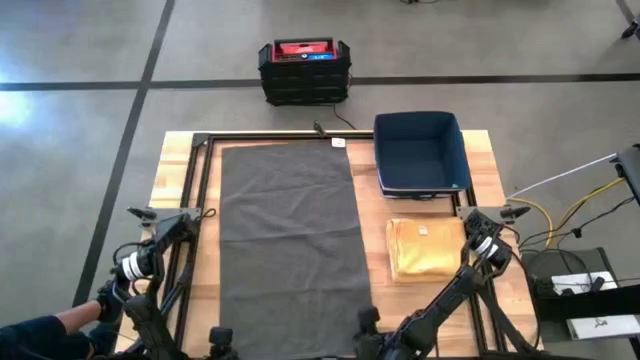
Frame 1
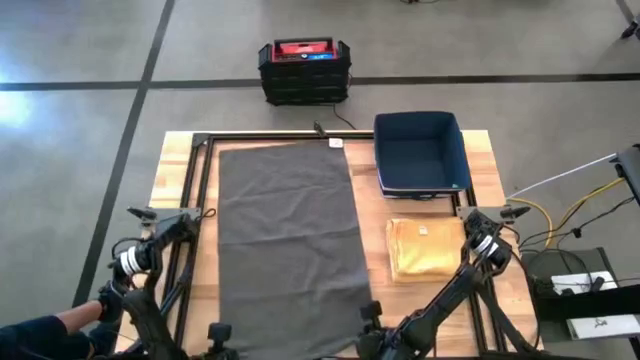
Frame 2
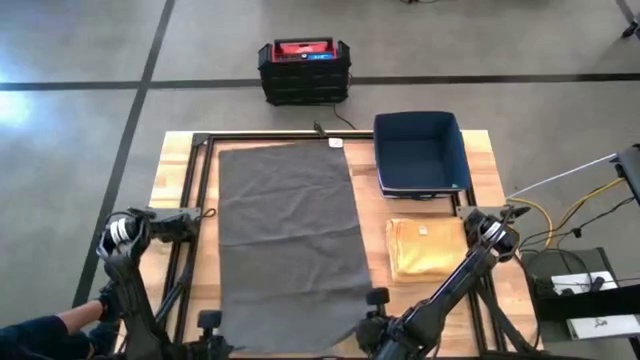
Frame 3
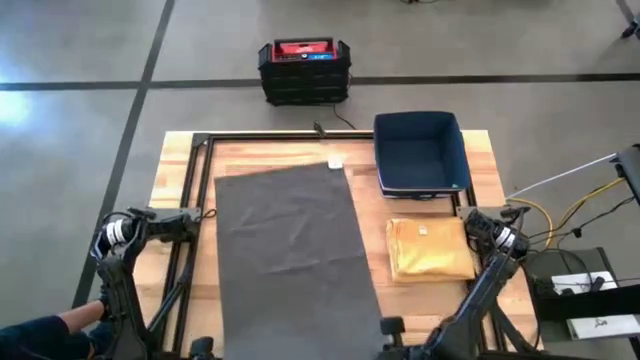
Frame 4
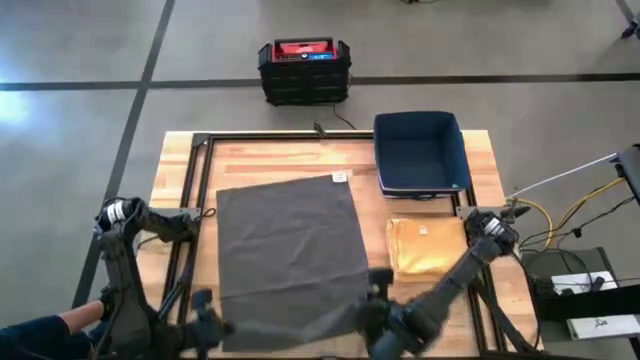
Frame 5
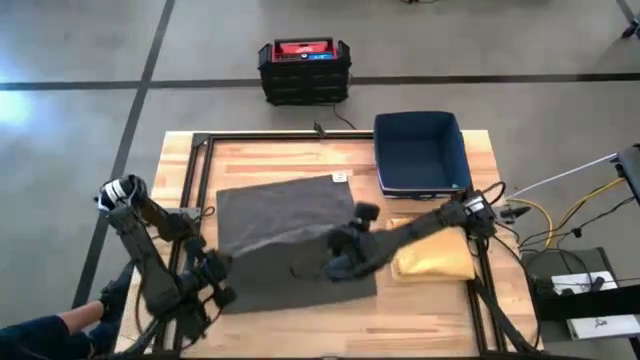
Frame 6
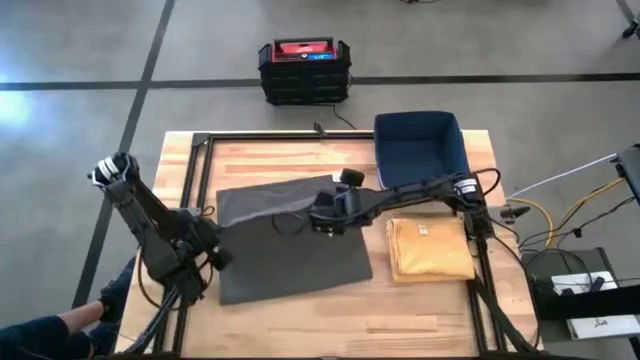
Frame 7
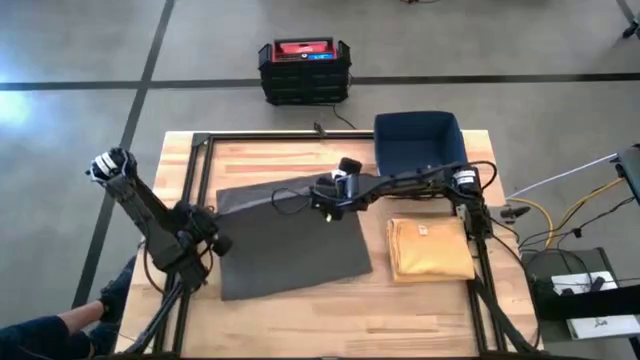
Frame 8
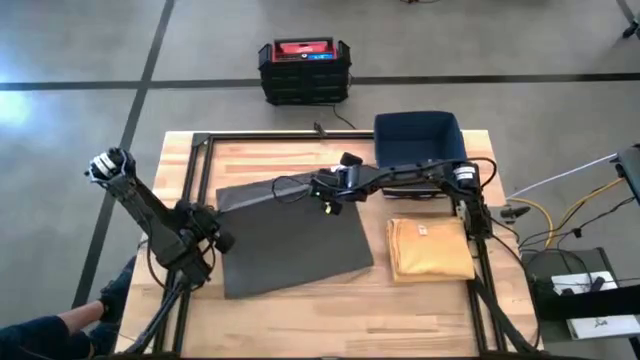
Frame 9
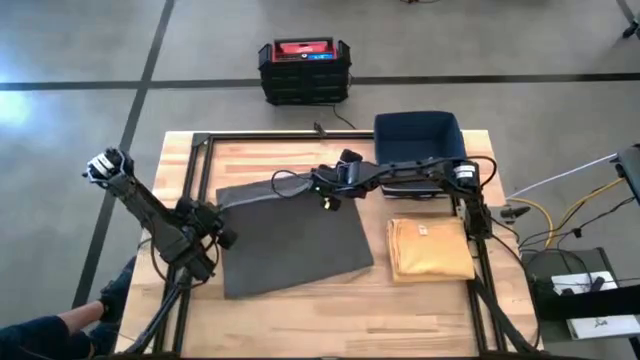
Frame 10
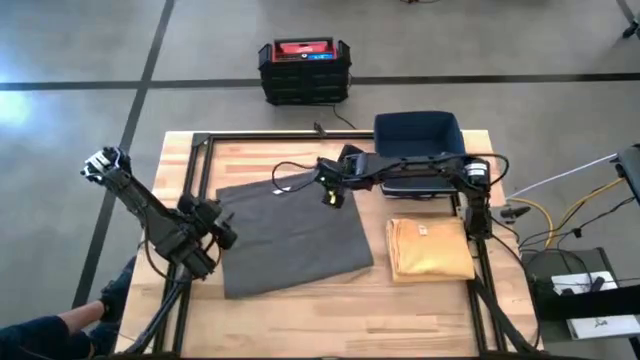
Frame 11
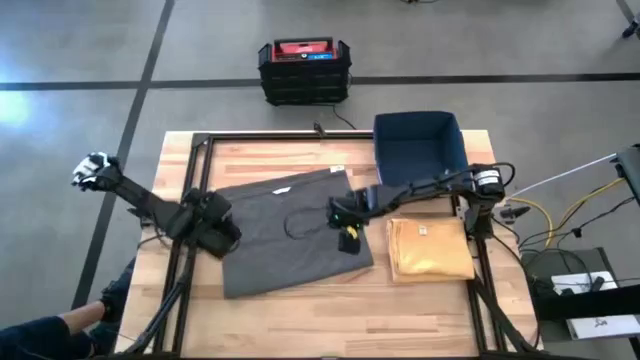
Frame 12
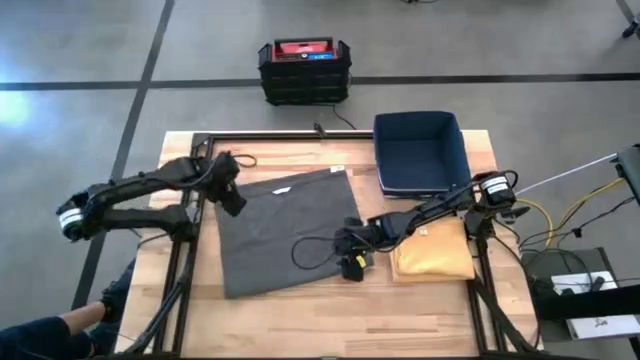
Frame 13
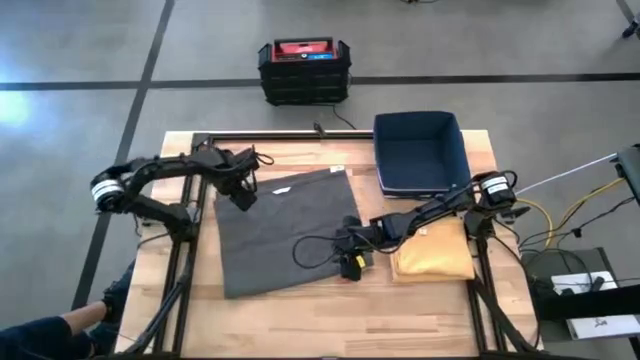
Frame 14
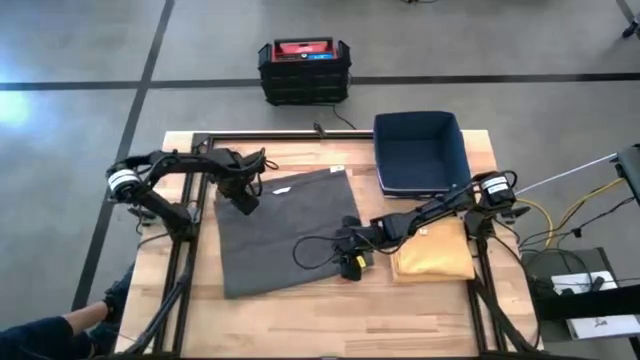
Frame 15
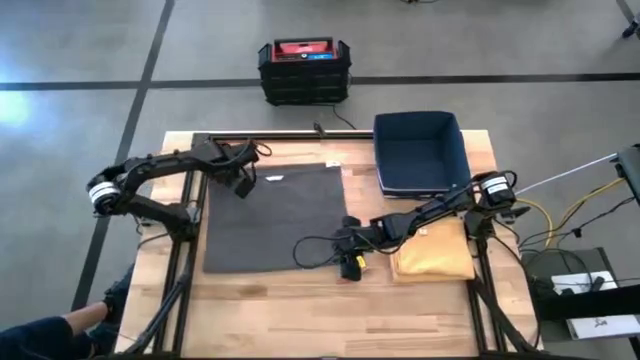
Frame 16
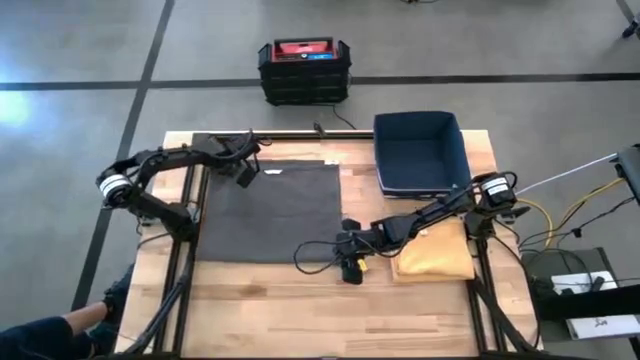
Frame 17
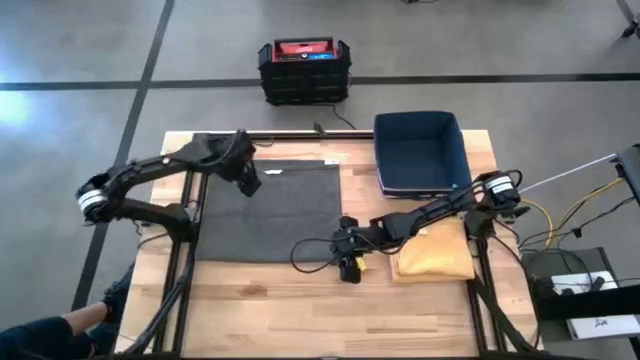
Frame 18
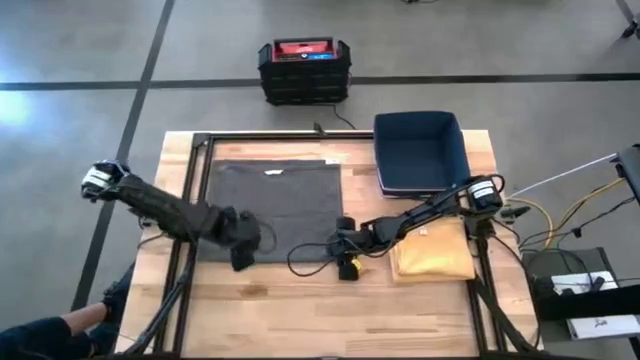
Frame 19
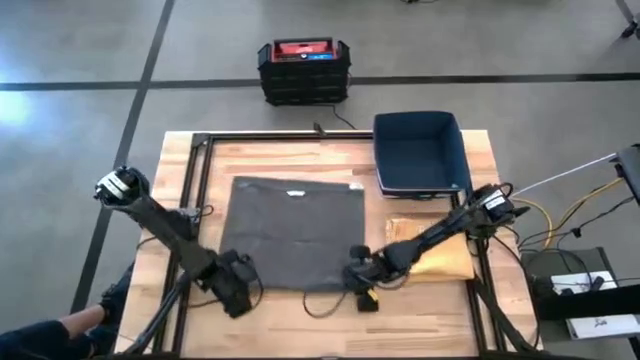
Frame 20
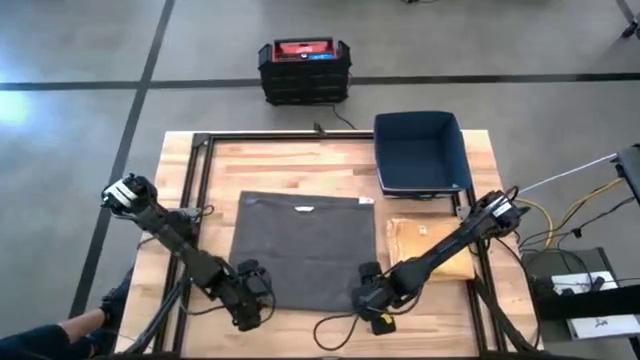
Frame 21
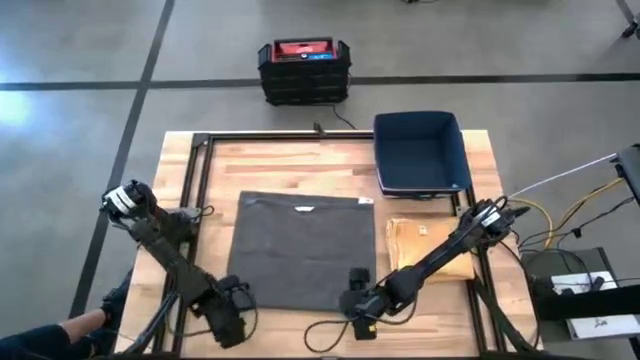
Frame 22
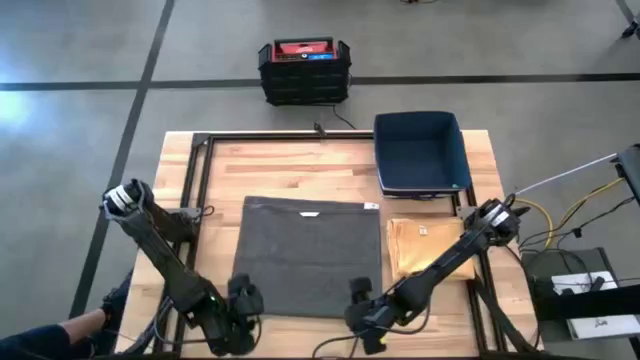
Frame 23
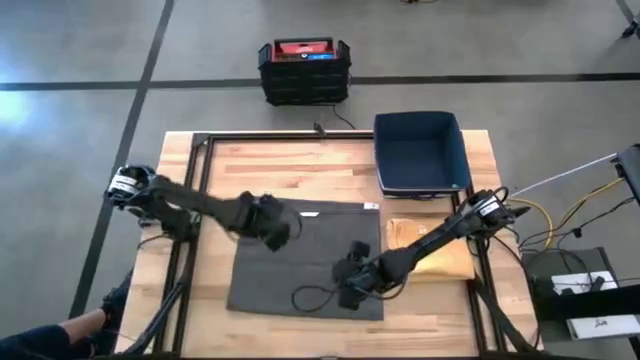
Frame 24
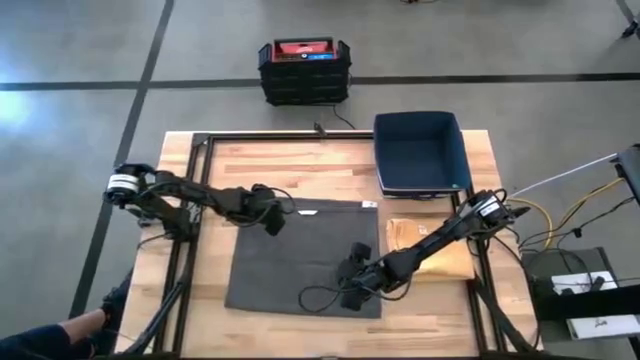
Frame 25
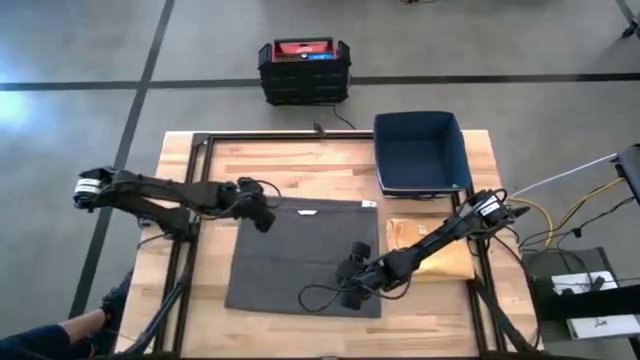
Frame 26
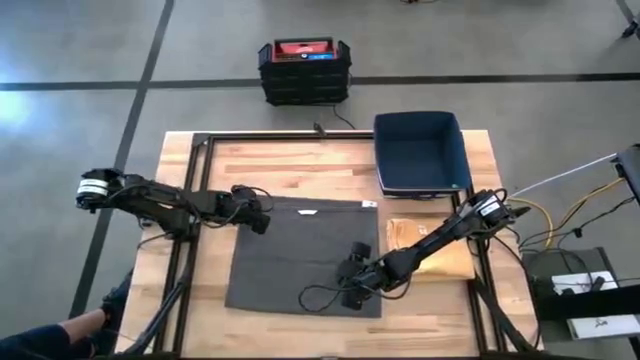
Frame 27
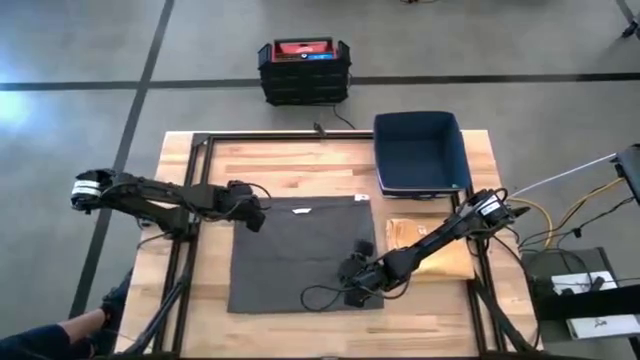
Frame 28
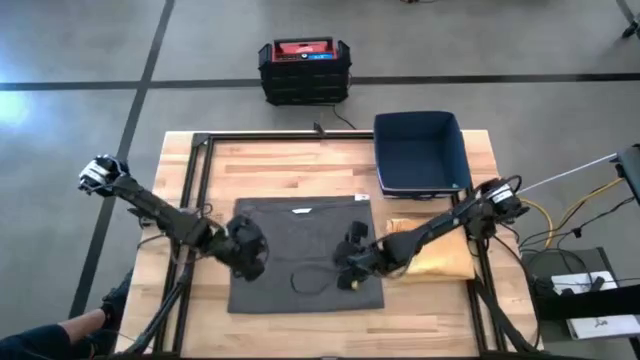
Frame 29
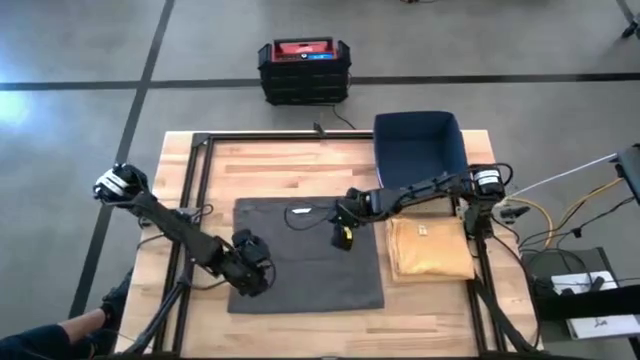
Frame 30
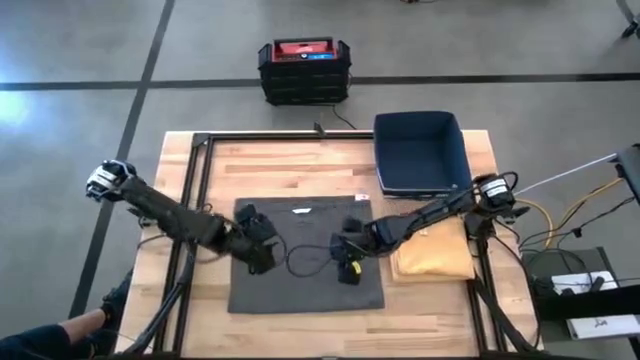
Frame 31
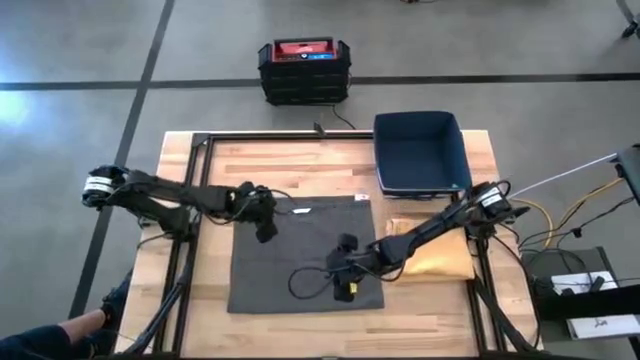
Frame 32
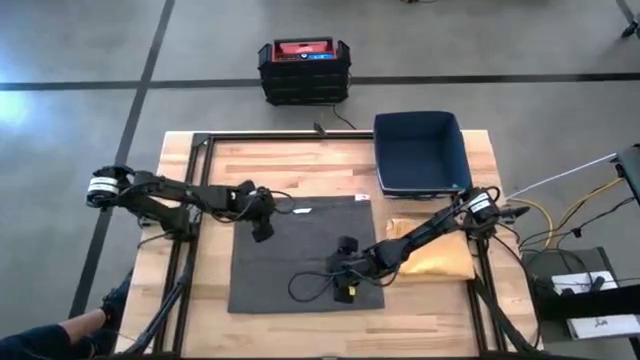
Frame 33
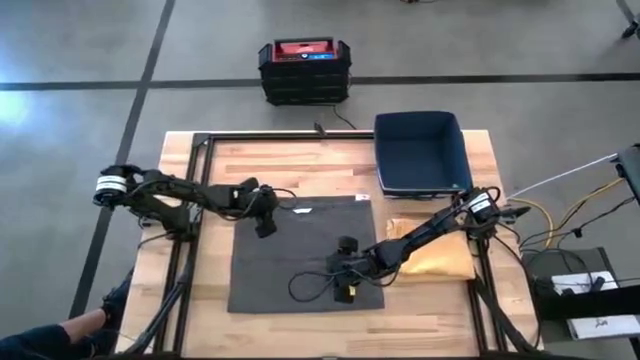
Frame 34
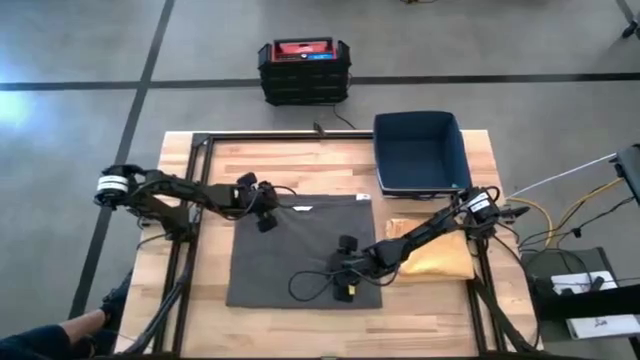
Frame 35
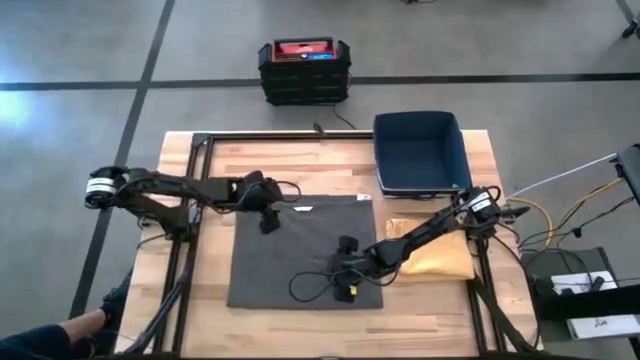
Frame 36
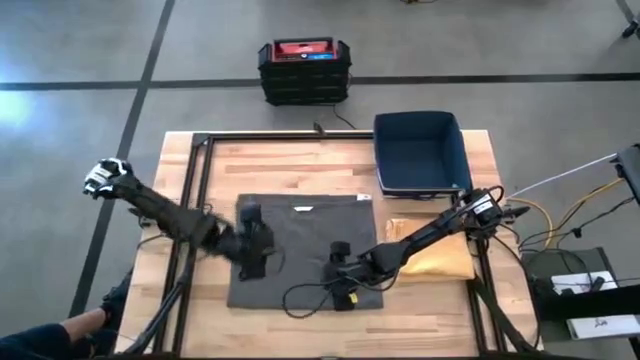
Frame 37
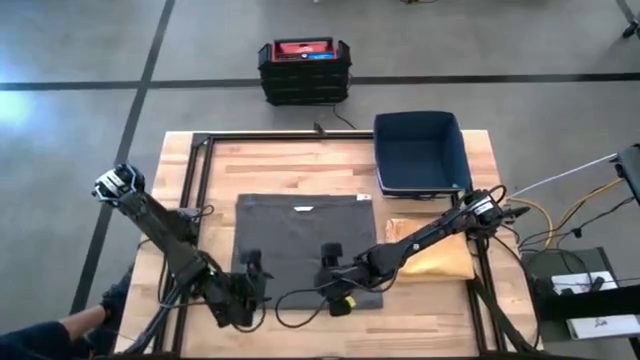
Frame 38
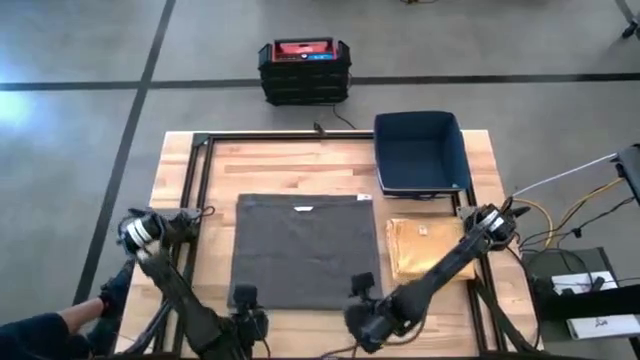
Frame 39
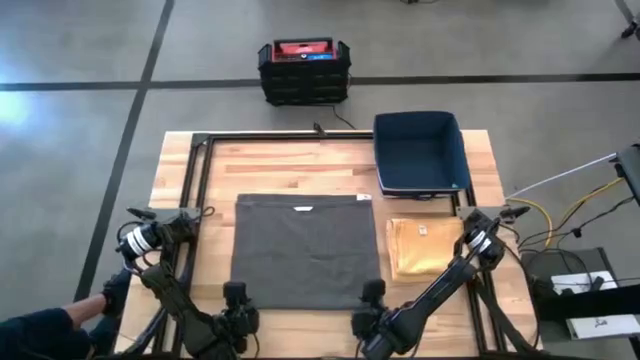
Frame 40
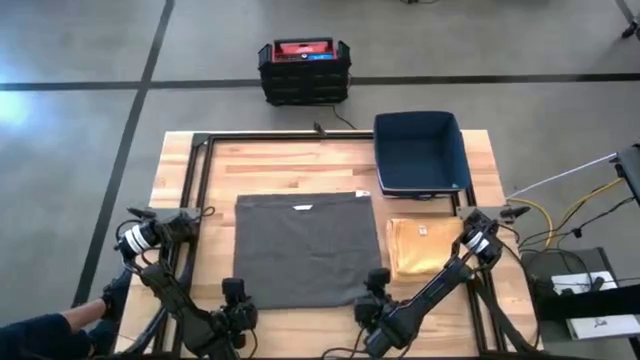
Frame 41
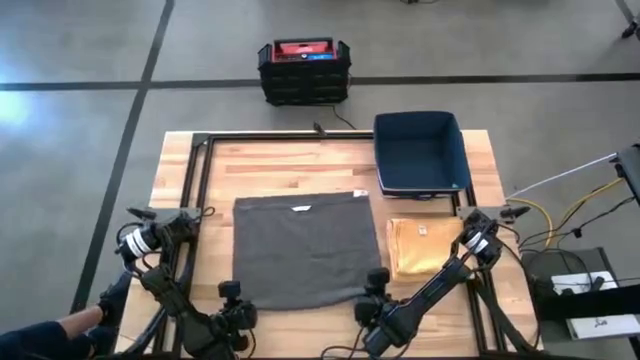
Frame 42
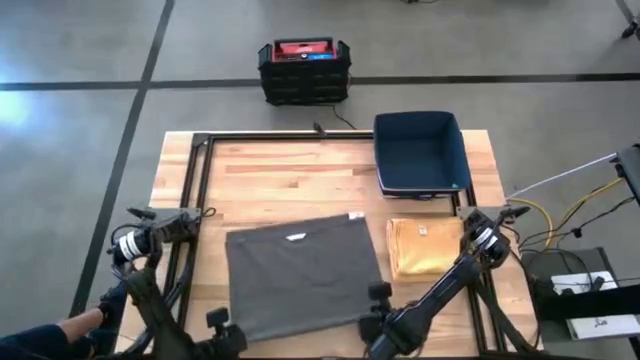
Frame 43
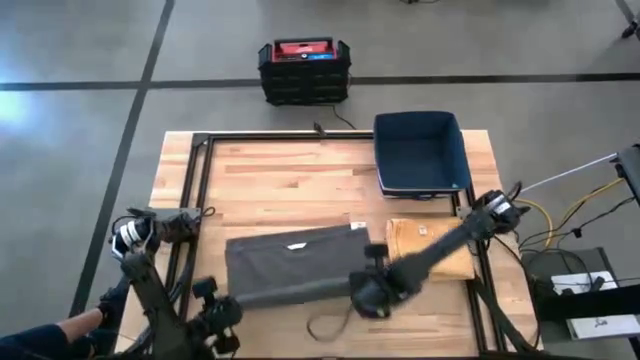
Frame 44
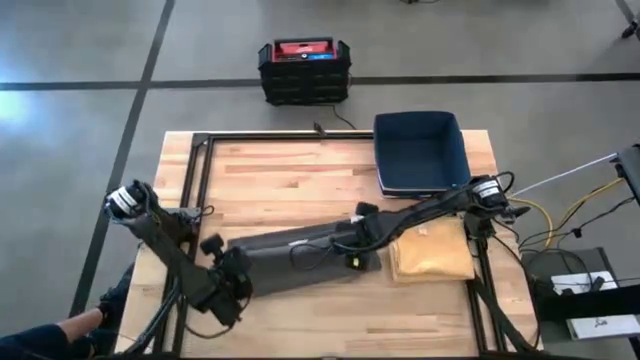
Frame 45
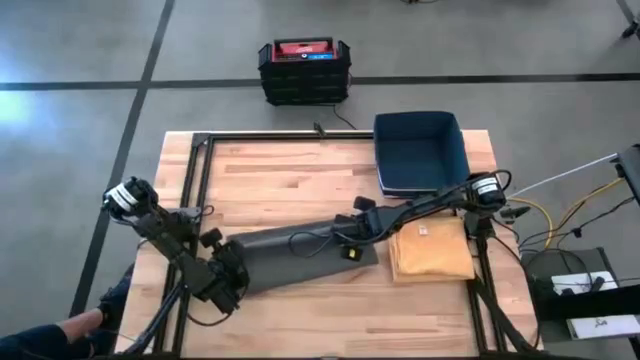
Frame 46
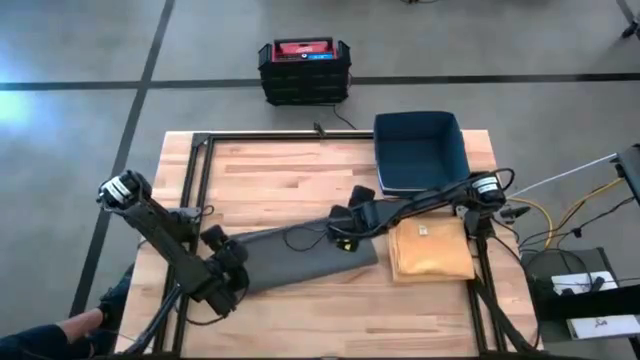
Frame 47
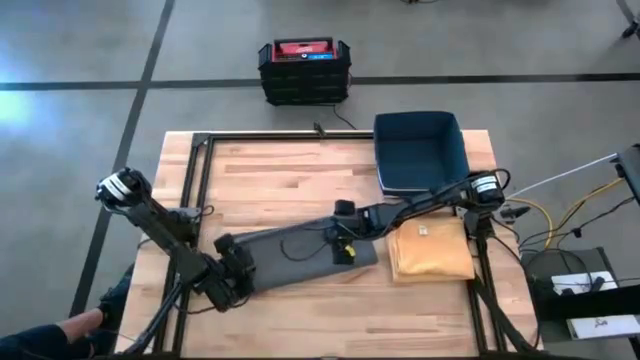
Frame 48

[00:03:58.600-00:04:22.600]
Task: Fold towel
Fold the gray towel
